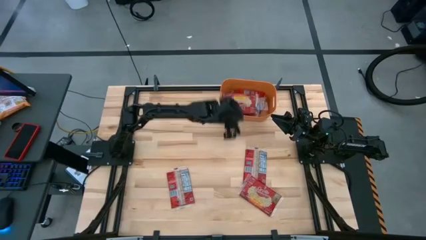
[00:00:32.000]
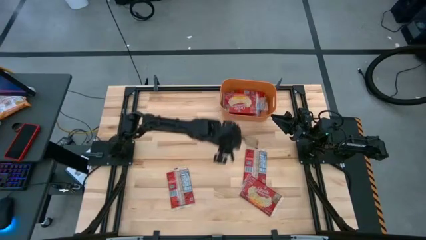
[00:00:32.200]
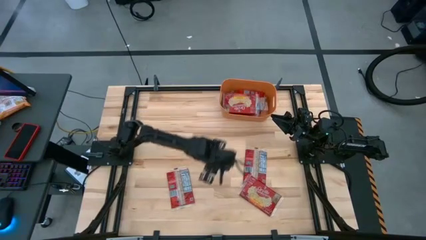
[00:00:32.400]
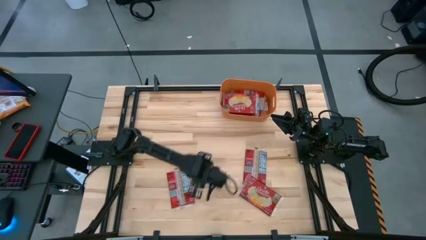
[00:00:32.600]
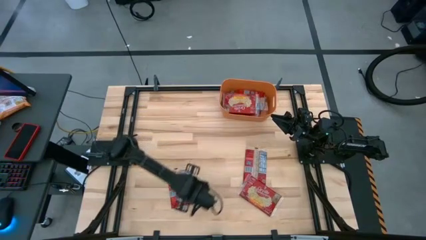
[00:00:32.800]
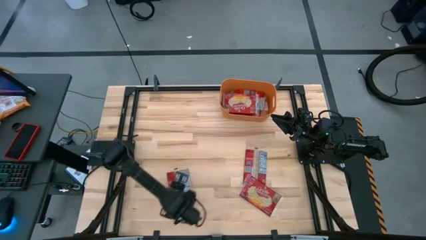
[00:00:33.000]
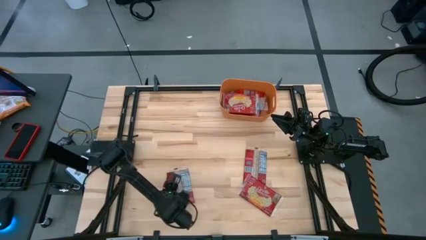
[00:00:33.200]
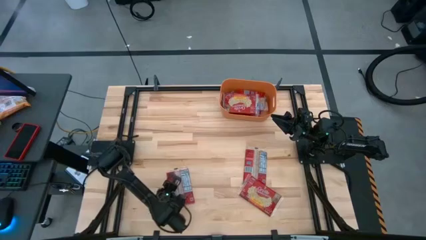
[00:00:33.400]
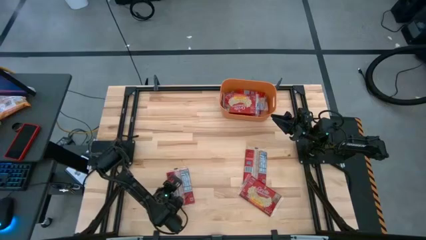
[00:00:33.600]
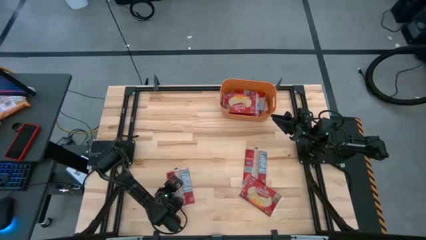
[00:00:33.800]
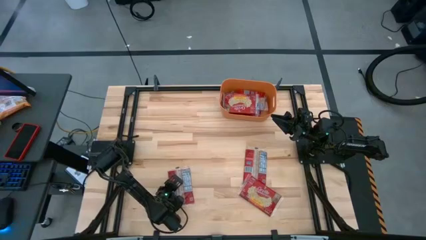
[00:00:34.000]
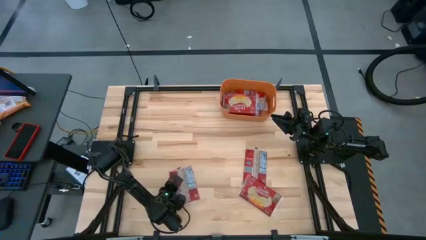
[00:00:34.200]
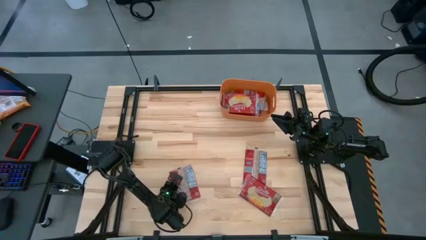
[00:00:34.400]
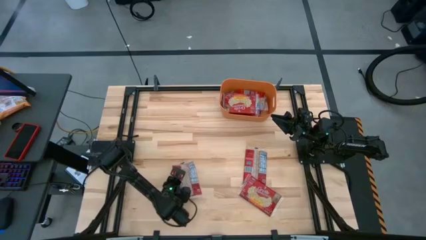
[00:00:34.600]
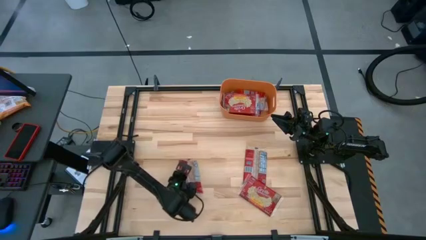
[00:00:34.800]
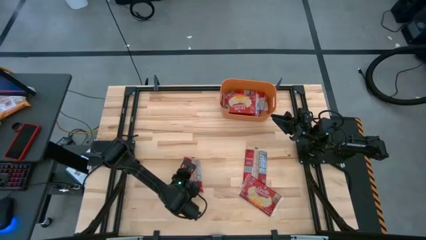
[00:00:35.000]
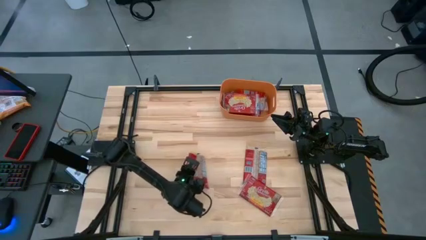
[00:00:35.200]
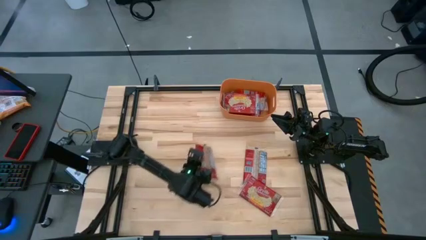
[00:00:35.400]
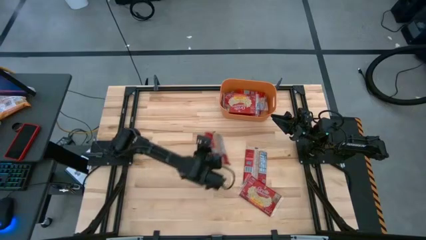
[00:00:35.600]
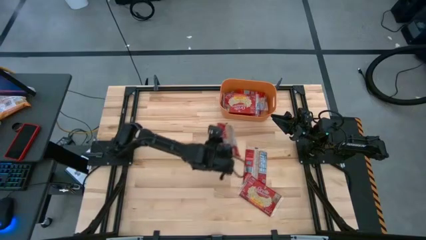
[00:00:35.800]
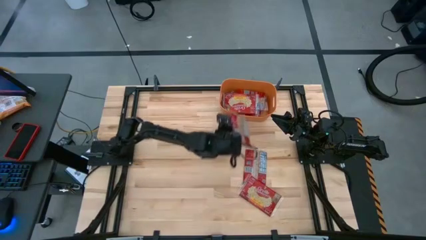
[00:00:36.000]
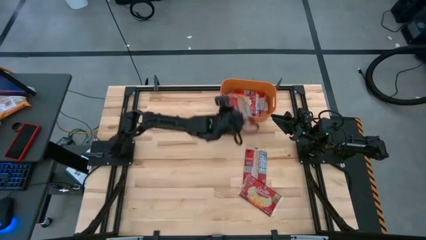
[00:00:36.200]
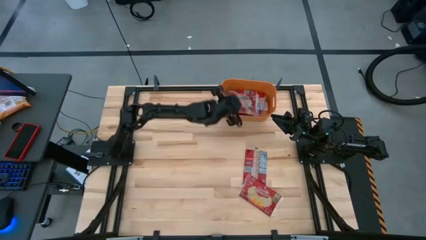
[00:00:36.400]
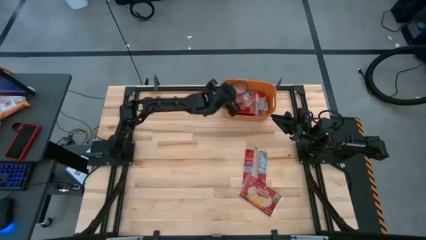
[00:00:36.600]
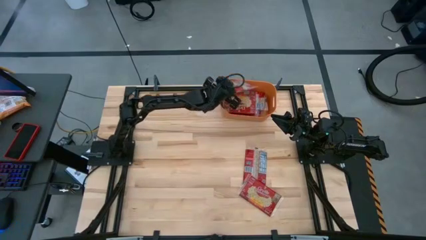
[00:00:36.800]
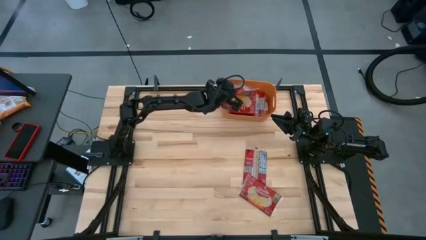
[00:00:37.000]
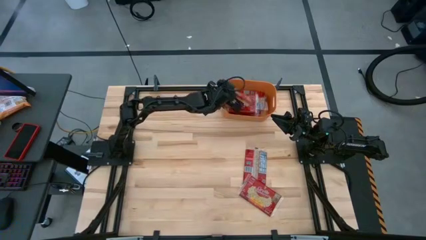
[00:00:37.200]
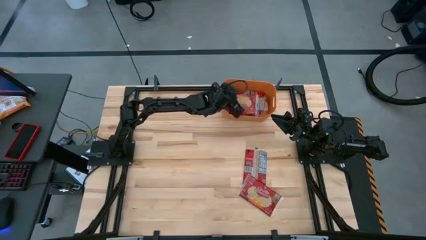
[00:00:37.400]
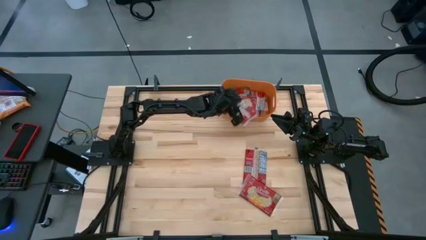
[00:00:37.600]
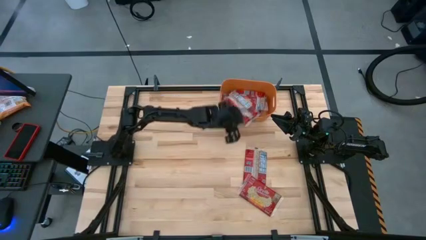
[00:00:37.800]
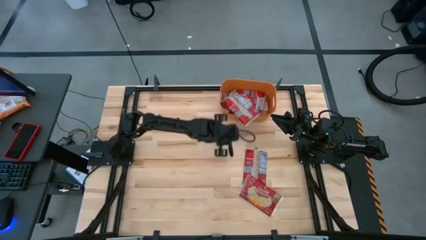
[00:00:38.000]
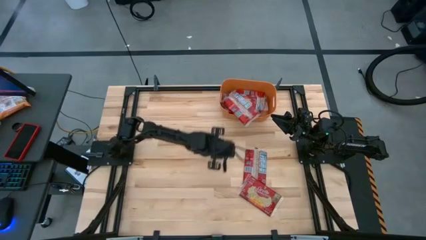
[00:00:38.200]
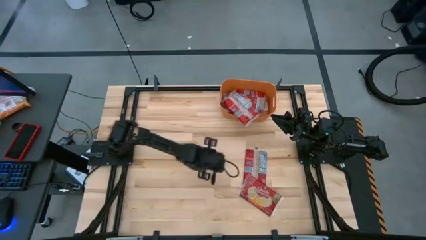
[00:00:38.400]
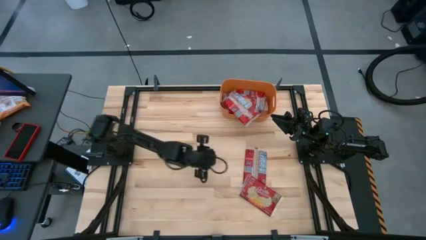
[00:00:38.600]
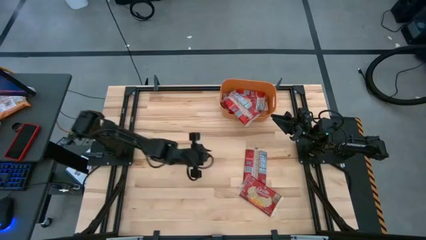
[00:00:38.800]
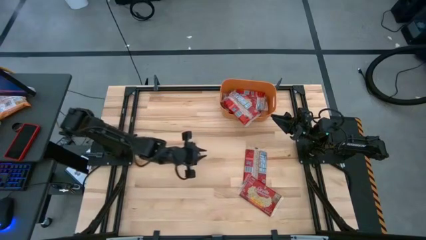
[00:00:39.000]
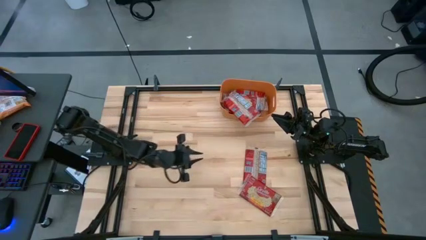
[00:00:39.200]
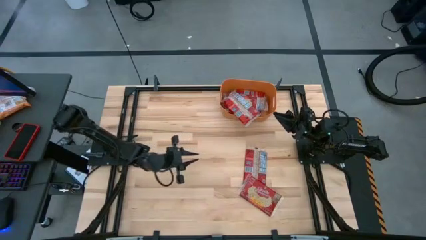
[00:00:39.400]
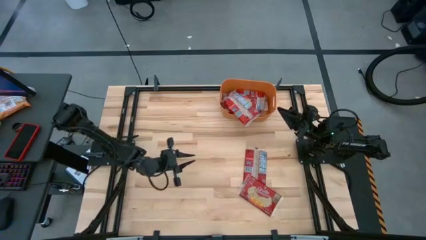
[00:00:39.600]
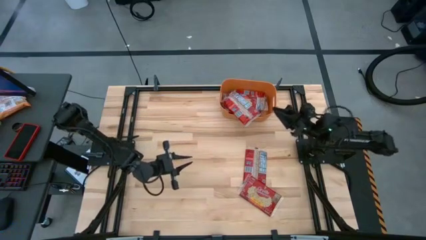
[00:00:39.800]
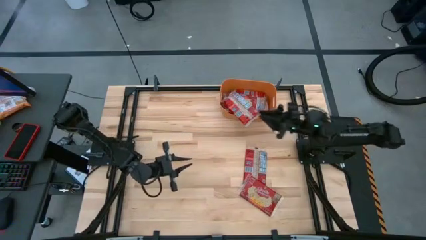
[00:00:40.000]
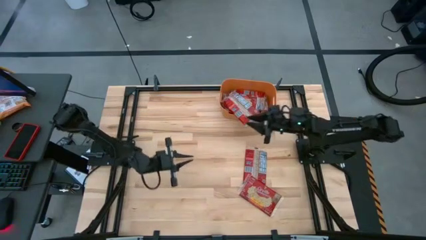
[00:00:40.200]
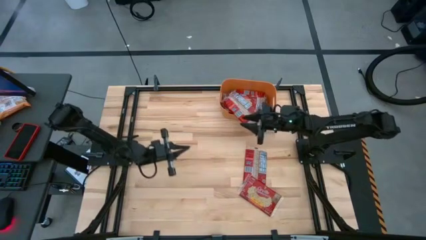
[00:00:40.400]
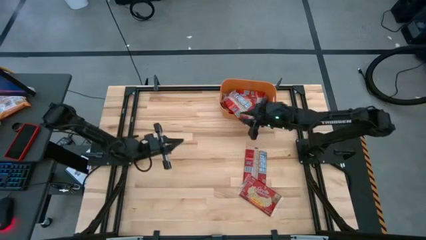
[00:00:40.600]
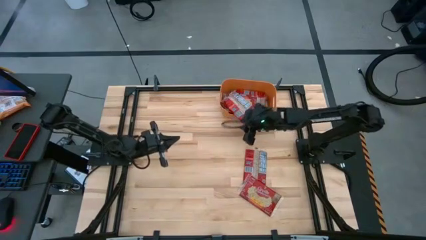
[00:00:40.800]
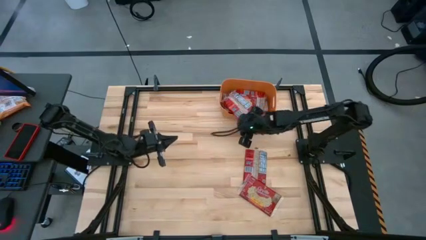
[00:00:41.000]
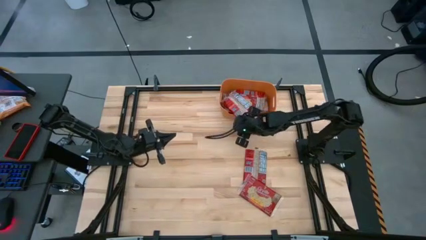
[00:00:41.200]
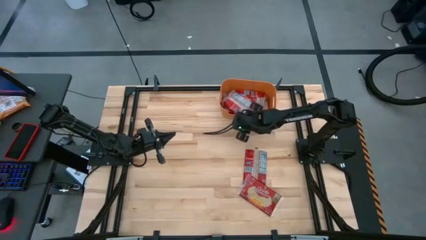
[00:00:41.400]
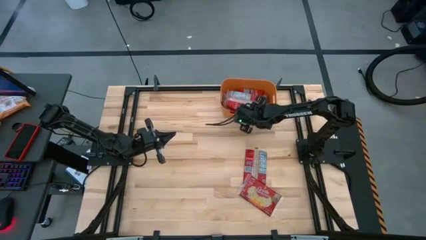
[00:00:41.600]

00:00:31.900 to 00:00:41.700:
Task: Sort popcorn bags into baskets
Put the red popcorn bag into the orange bin

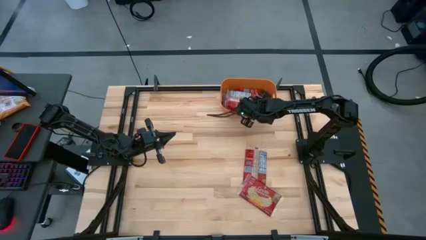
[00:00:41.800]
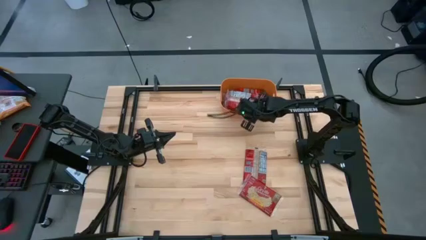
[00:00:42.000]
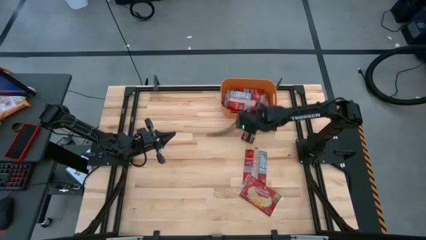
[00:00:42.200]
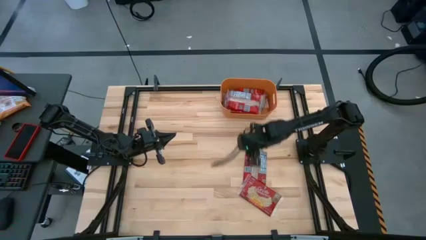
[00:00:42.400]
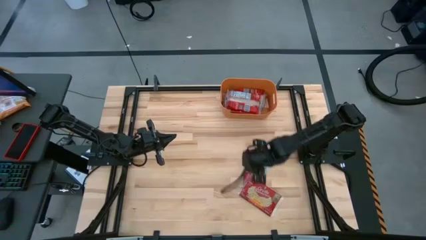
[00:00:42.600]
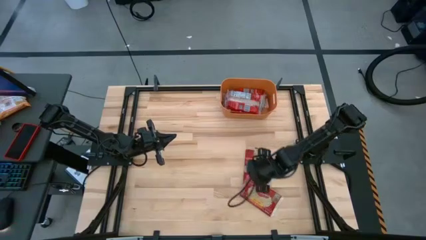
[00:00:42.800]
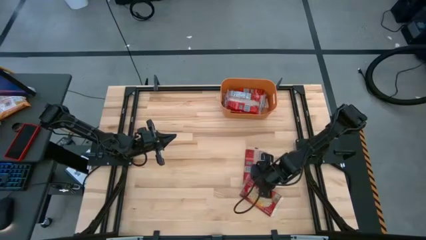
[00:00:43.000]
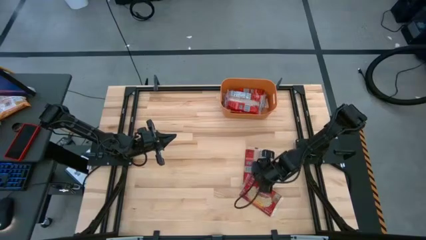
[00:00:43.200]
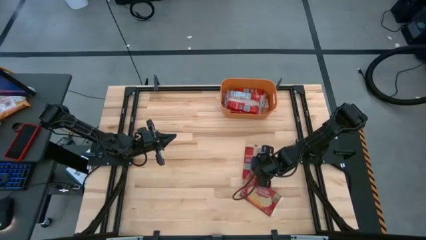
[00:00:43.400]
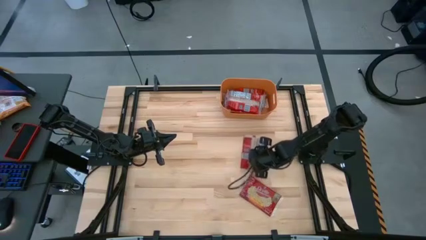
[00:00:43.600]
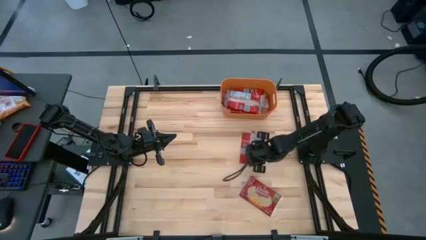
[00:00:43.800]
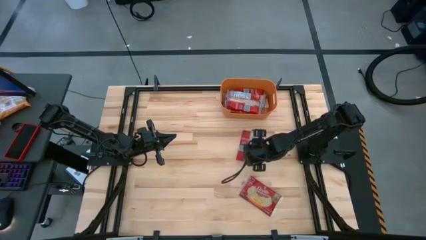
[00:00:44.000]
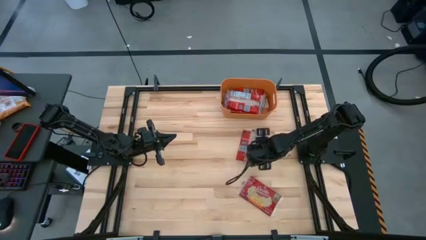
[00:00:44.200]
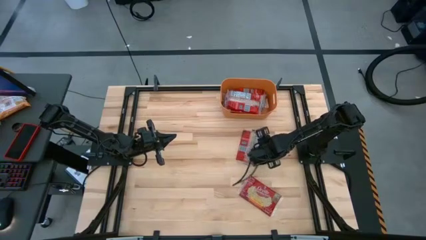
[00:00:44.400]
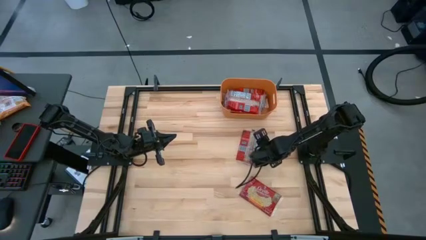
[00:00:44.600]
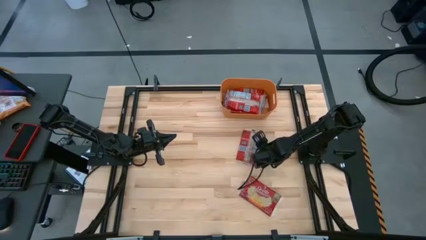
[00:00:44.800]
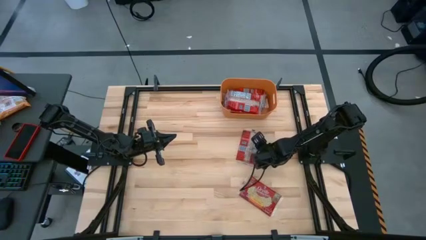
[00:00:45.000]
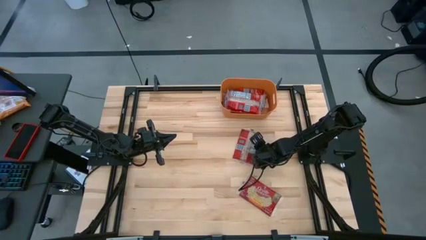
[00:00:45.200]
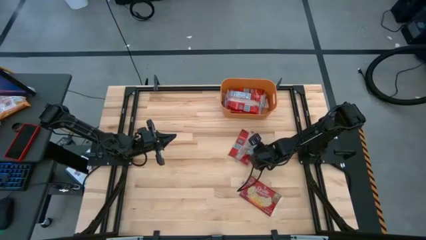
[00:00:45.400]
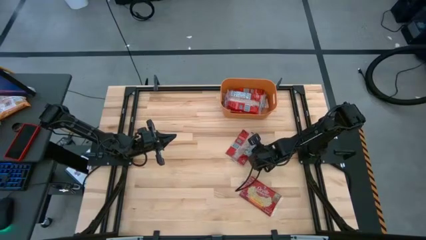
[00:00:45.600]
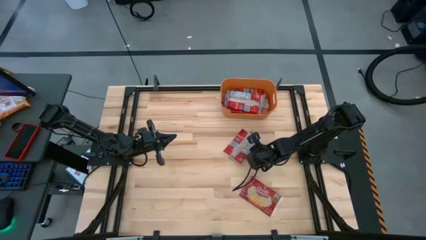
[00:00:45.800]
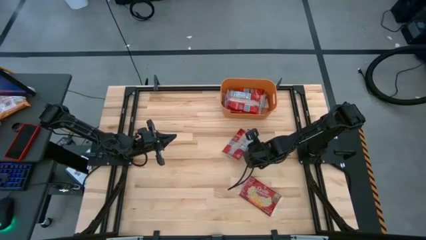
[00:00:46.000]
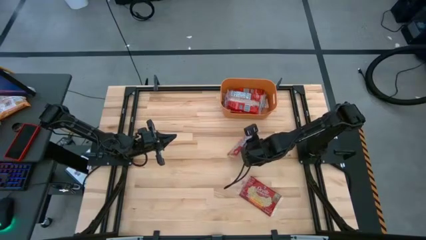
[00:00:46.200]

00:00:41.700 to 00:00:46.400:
Put the red popcorn bag into the orange bin

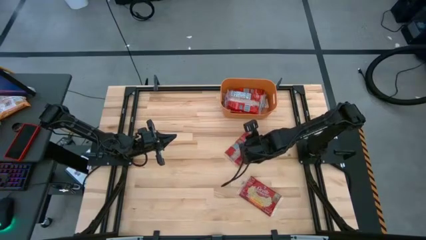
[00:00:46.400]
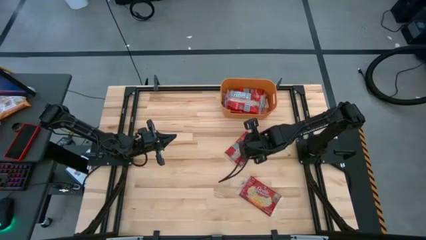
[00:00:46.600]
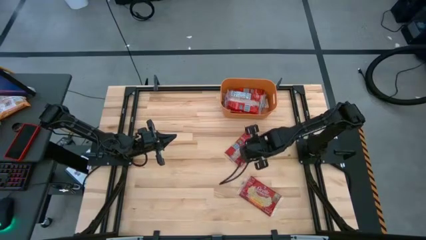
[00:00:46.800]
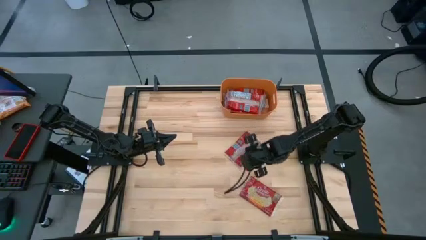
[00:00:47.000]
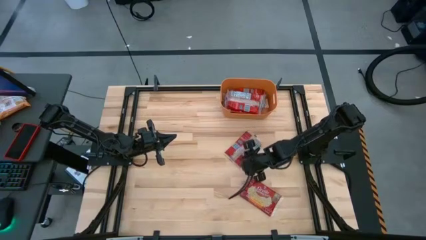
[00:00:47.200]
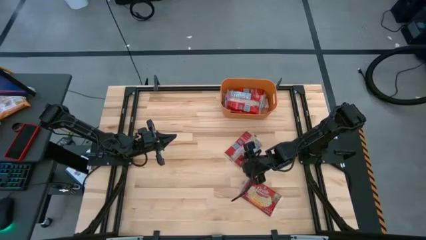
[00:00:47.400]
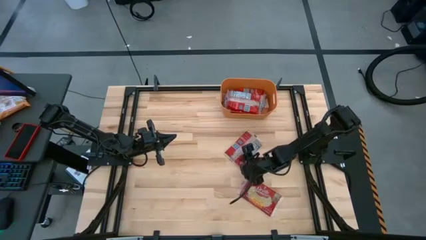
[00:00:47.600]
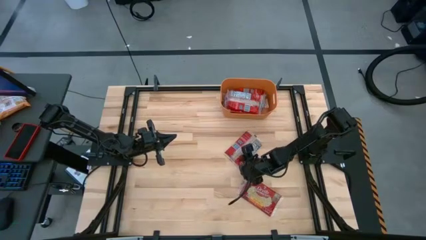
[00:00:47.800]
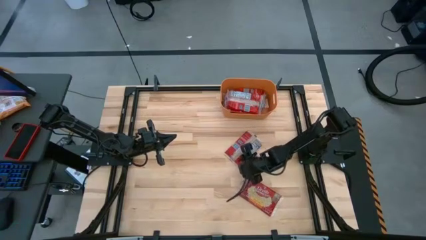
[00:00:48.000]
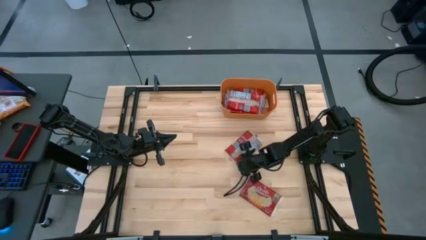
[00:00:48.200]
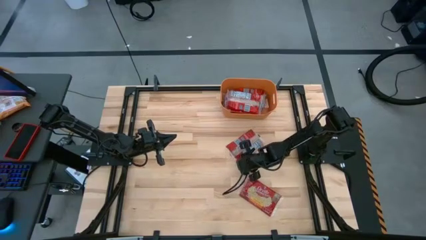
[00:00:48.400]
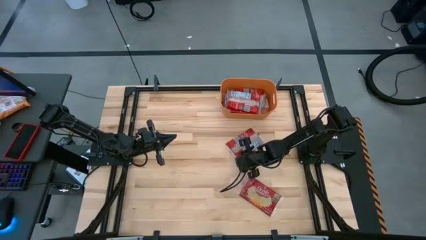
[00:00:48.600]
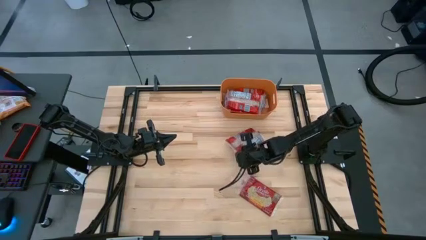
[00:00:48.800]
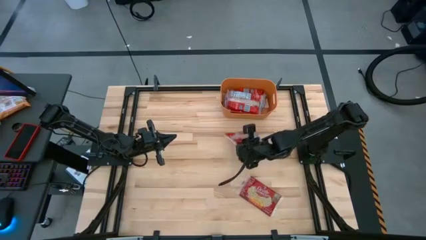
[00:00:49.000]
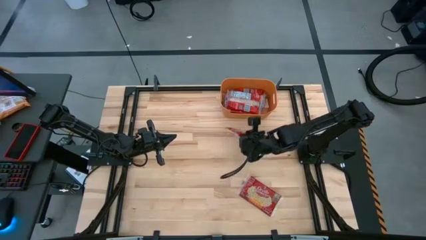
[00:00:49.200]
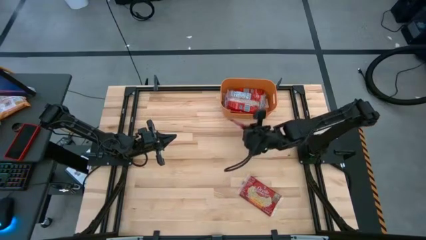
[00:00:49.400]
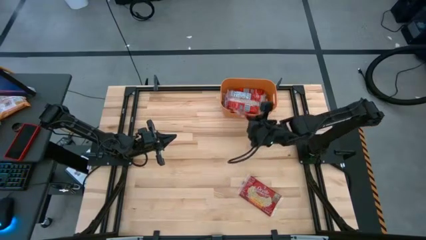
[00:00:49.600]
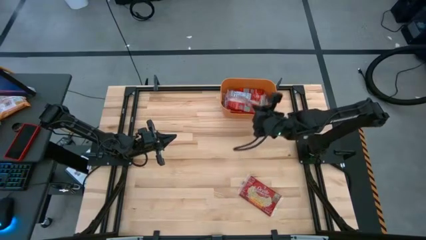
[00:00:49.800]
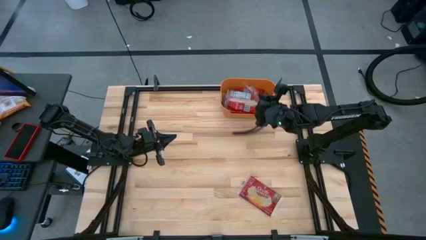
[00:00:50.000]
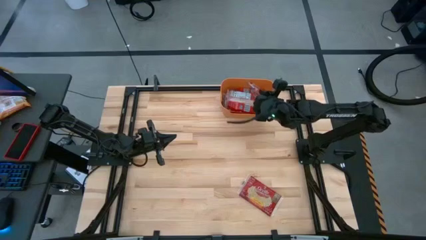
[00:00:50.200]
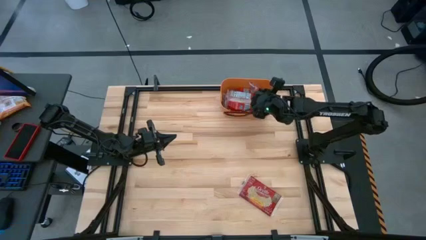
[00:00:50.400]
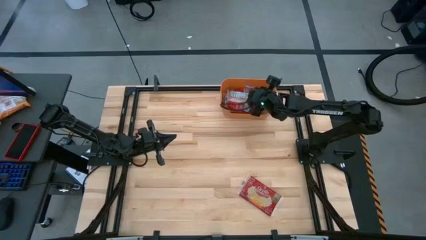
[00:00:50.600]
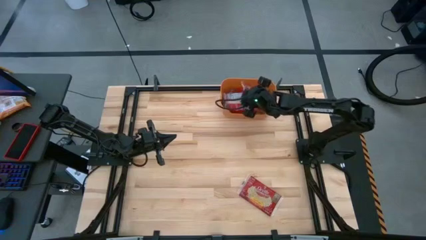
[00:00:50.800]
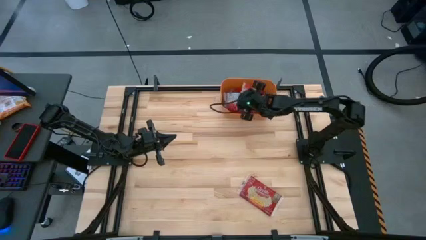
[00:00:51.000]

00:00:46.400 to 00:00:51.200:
Put the red popcorn bag into the orange bin
